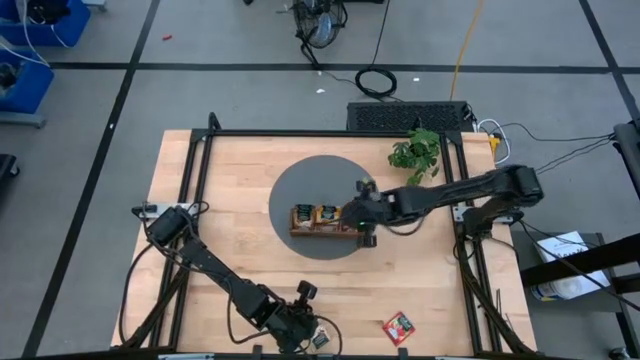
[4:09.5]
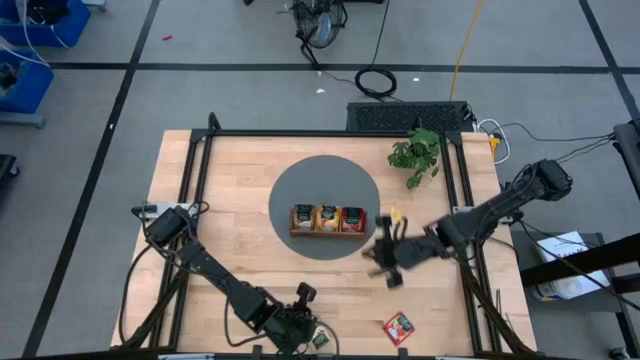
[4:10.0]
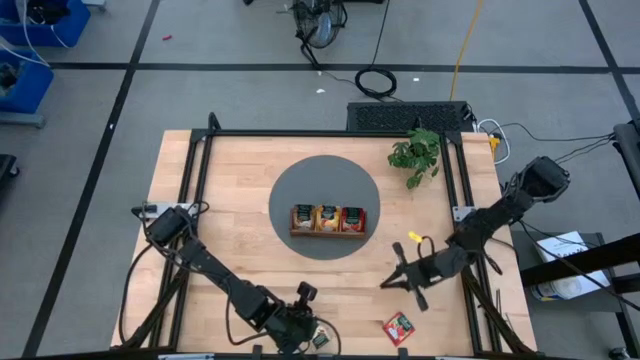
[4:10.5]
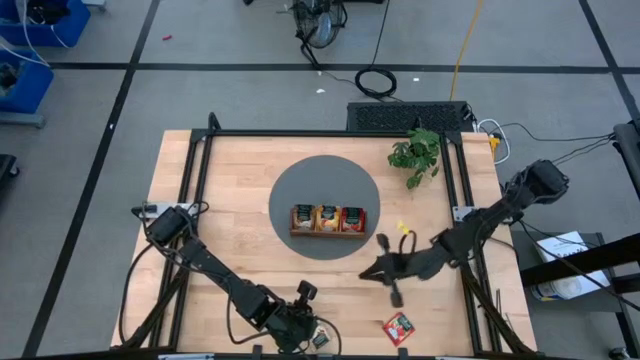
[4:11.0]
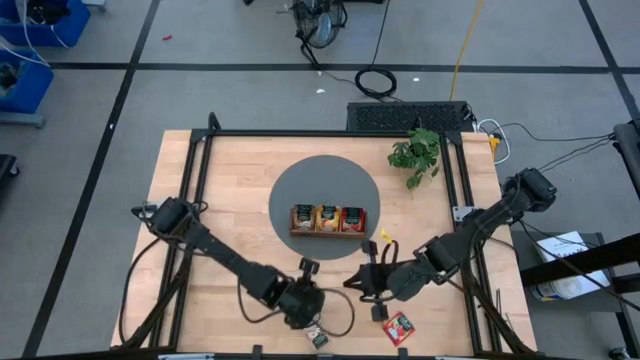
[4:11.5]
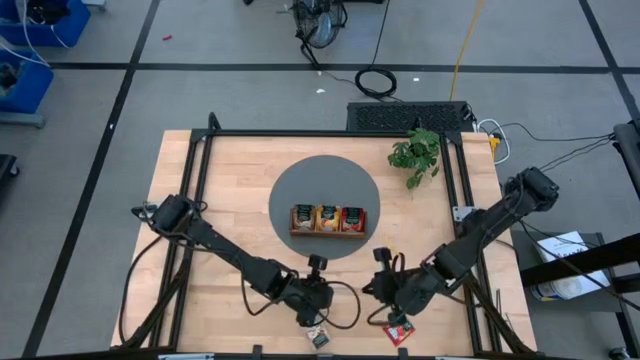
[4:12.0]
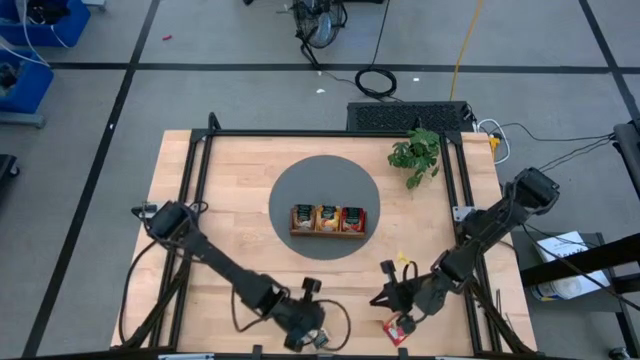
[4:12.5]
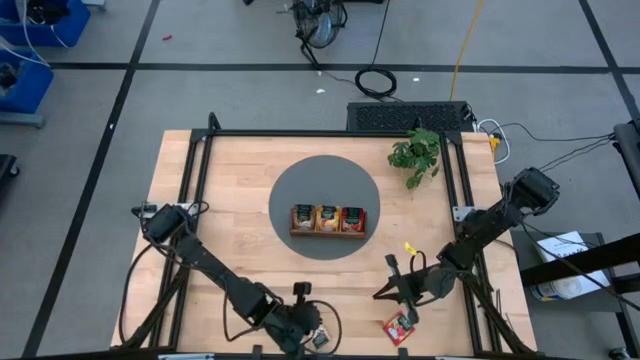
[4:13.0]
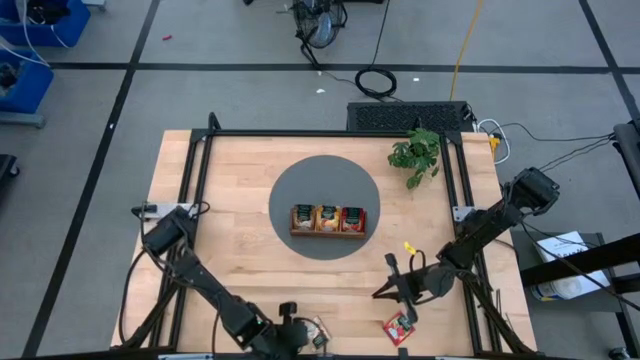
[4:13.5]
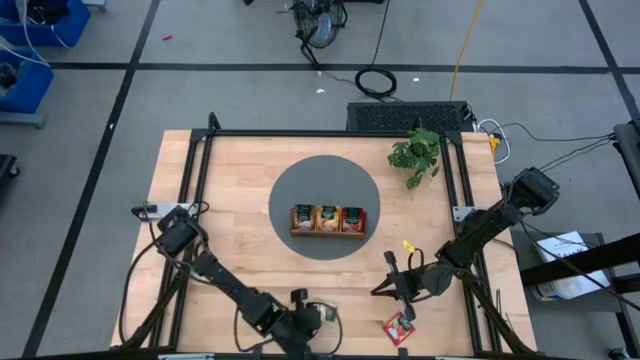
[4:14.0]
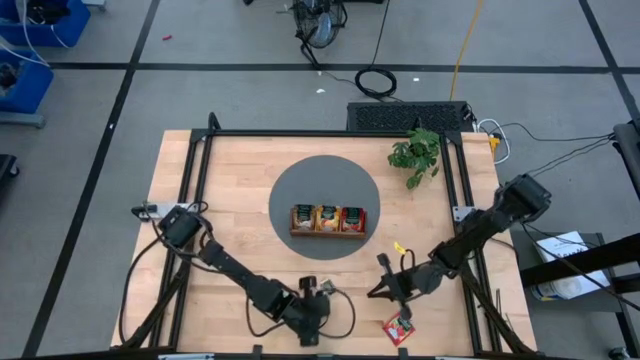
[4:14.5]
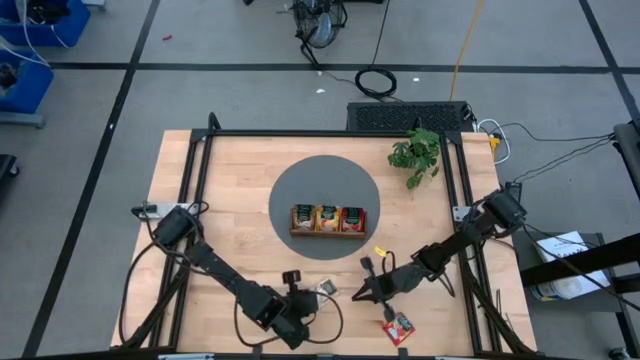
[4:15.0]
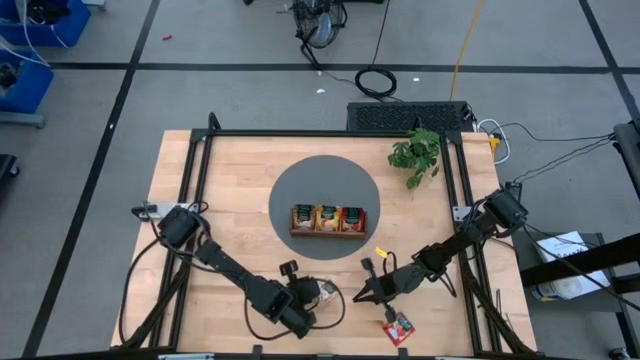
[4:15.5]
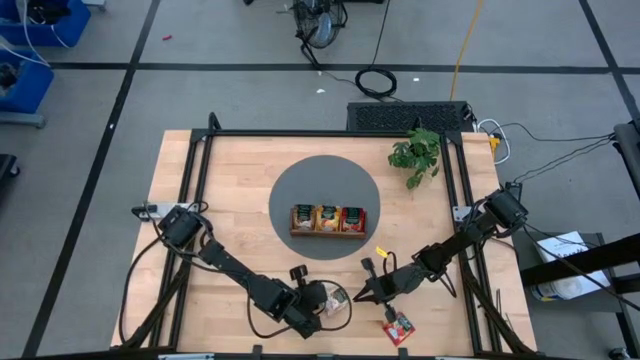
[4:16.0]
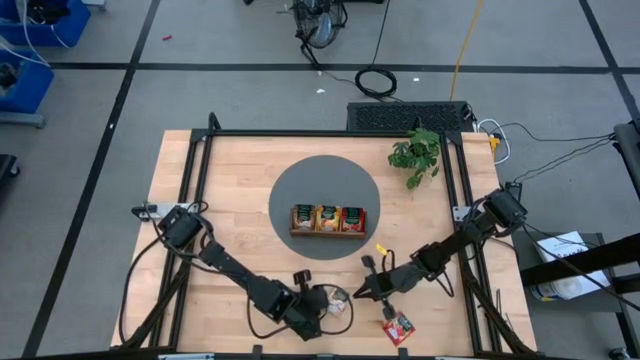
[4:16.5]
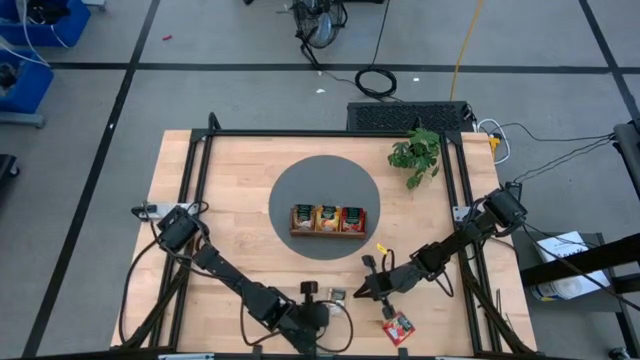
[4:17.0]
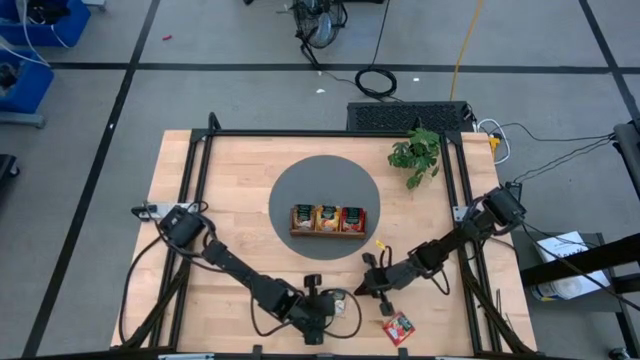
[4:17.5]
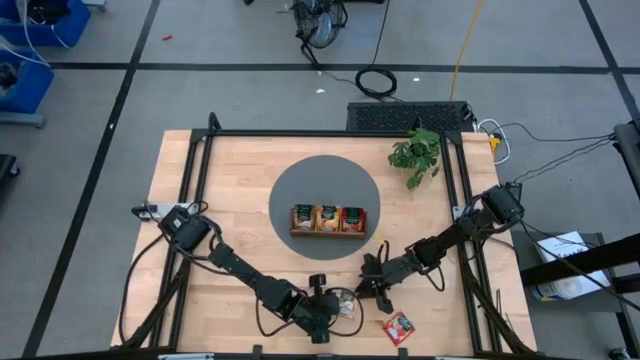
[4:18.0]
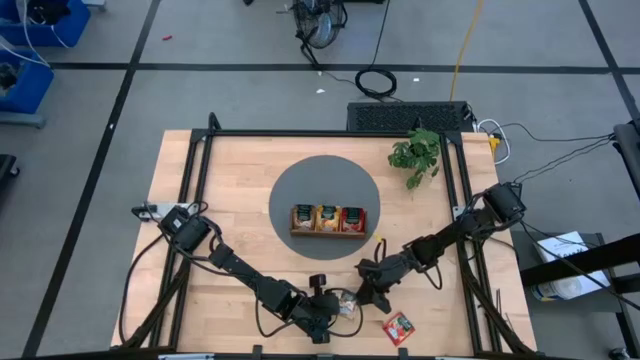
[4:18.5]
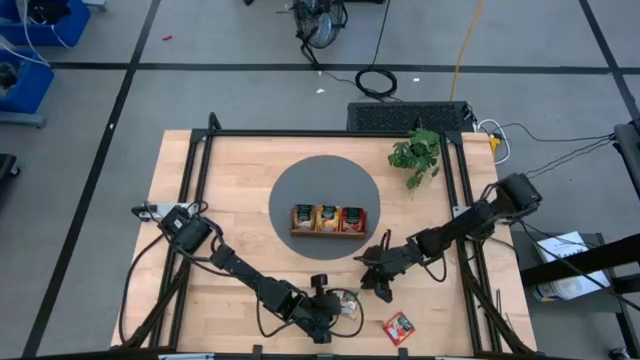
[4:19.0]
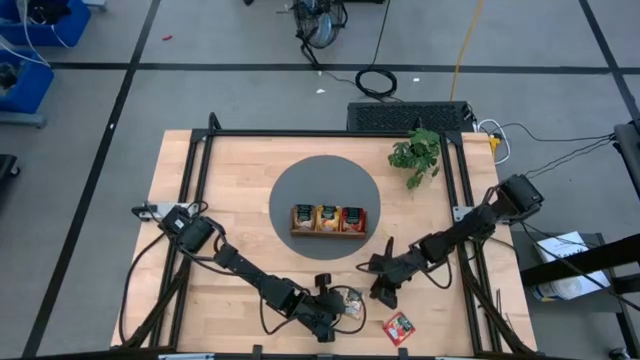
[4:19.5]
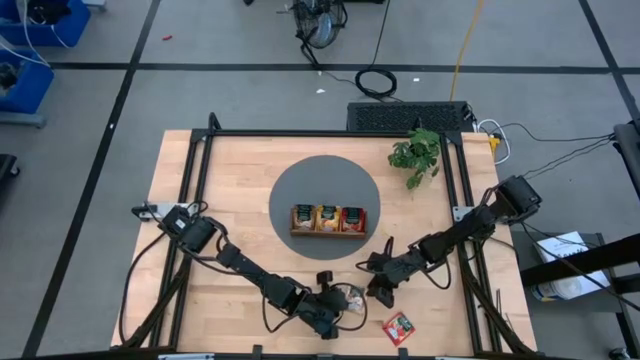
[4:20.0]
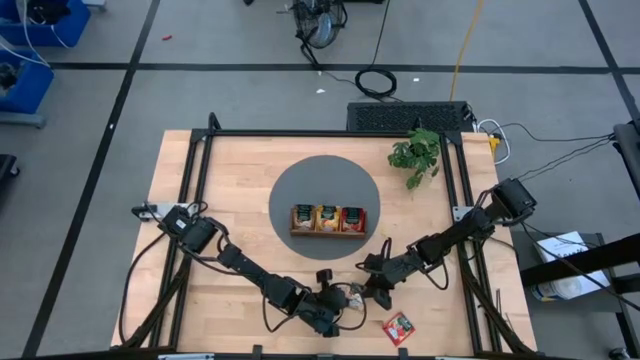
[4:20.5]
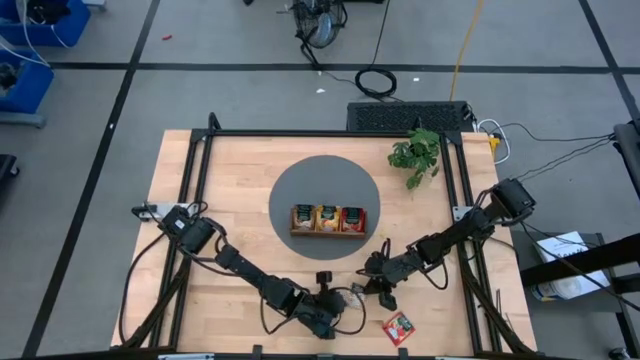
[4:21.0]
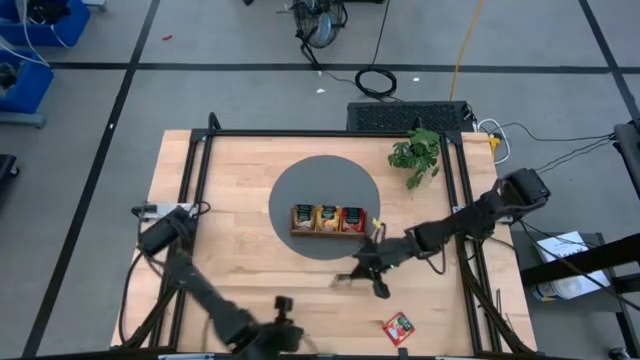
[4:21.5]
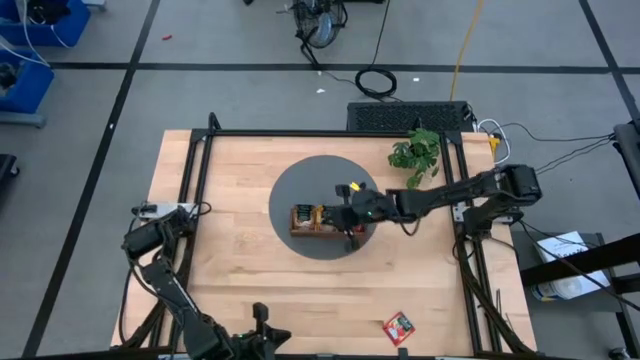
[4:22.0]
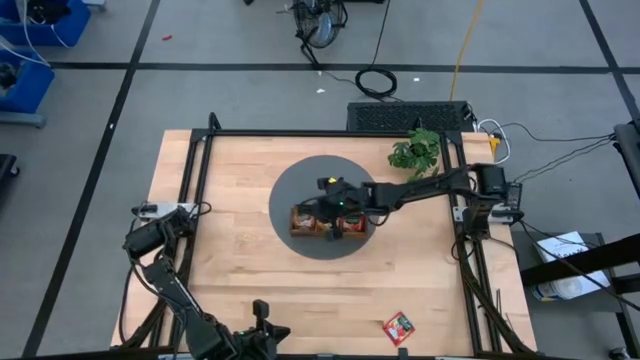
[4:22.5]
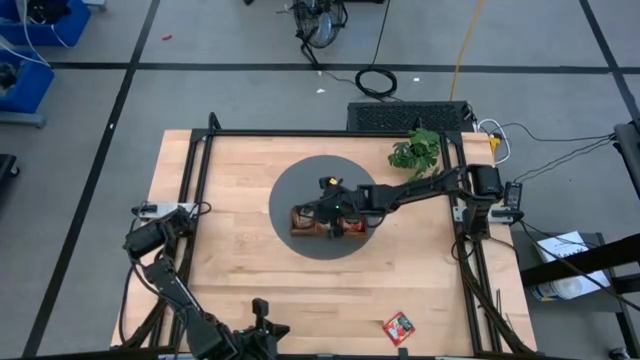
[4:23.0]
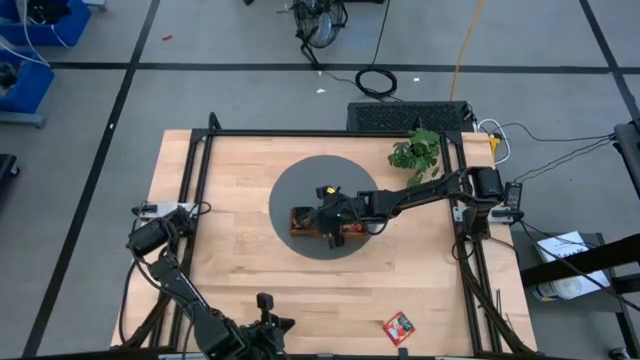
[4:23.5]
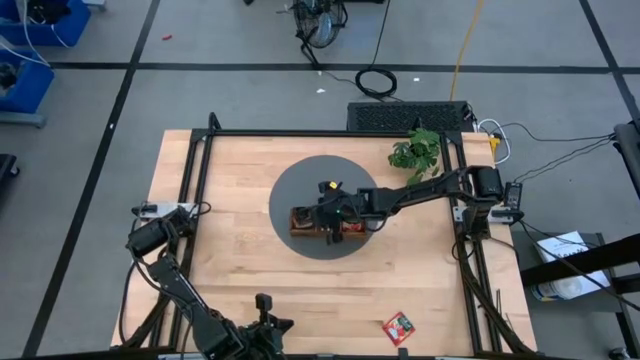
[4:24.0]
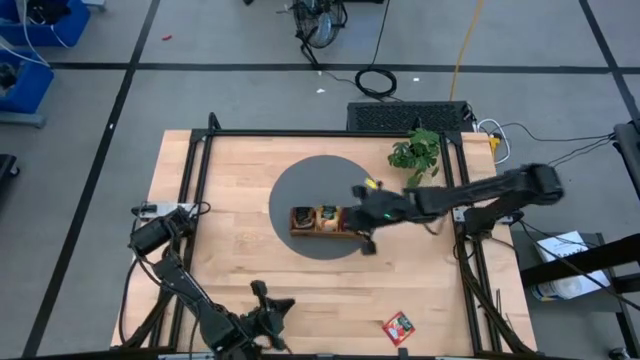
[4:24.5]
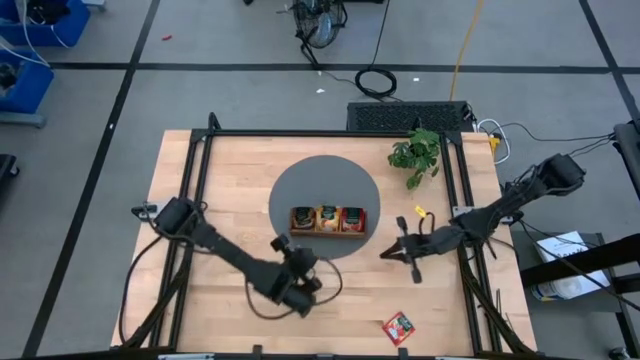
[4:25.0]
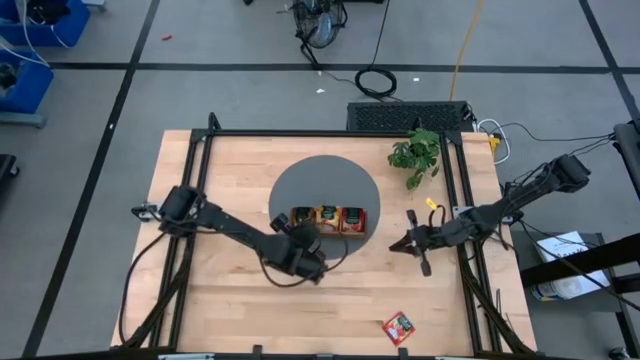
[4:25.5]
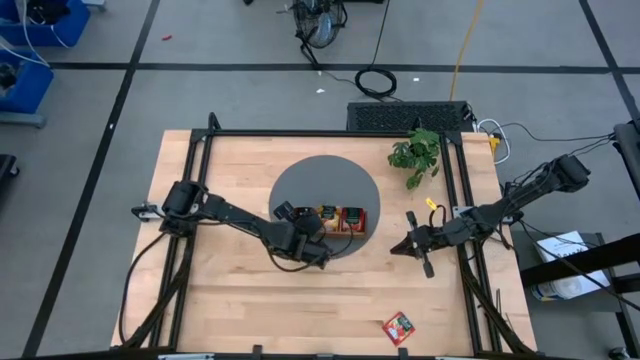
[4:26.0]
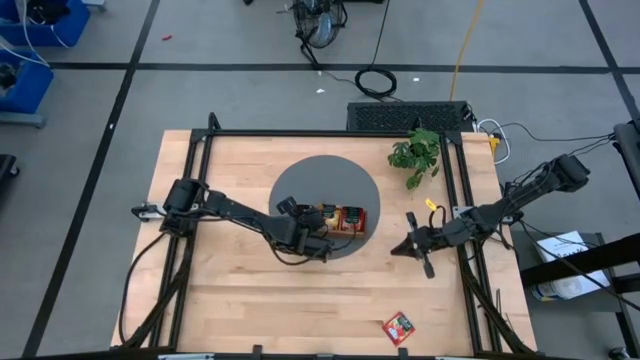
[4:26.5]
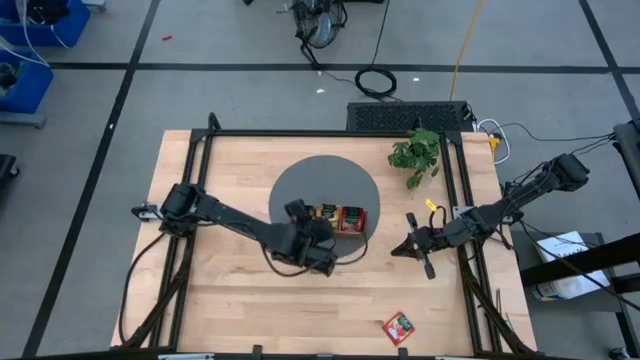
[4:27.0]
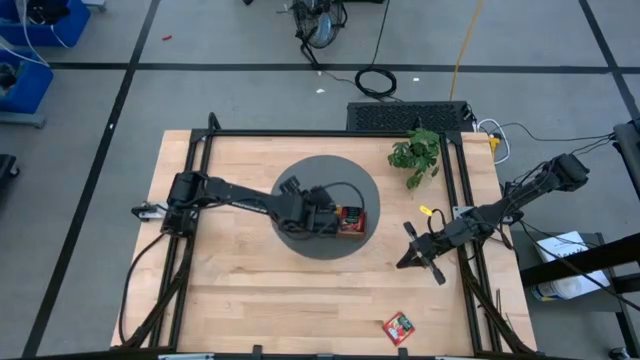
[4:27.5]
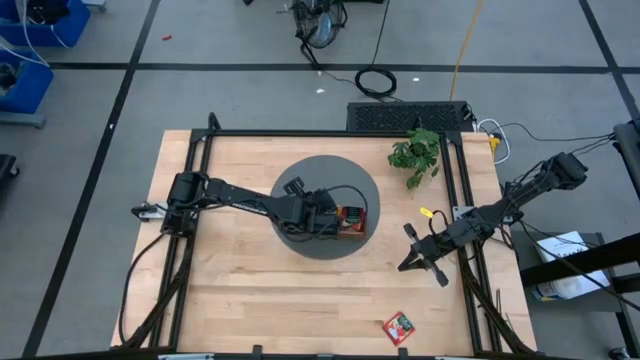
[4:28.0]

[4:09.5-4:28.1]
Task: Pick & Place Tea
Put the brown tea bag into the left section of the wooden organizer

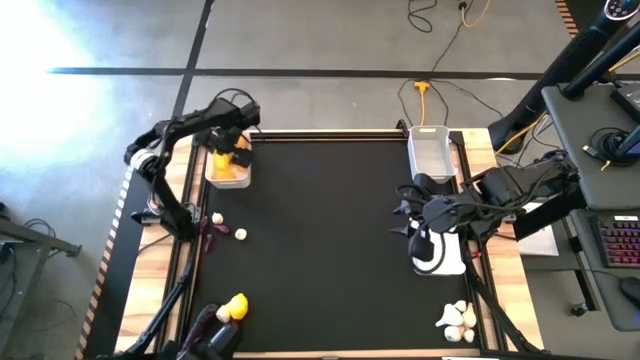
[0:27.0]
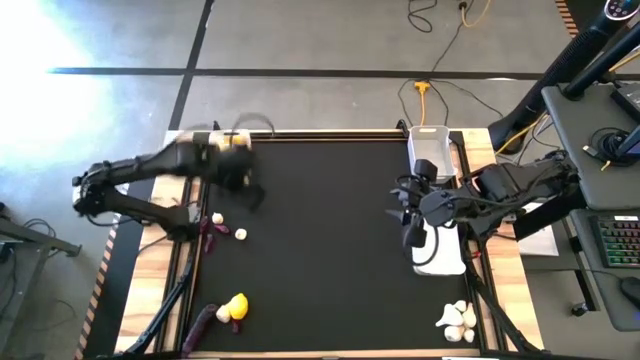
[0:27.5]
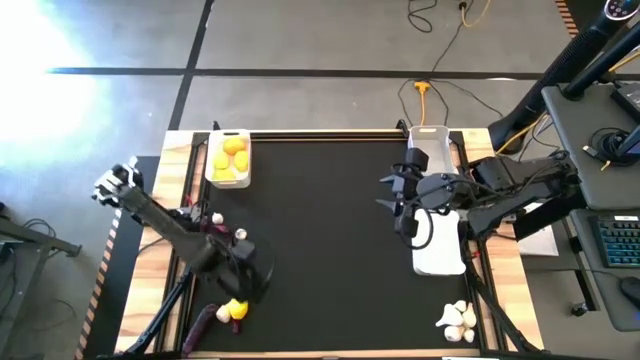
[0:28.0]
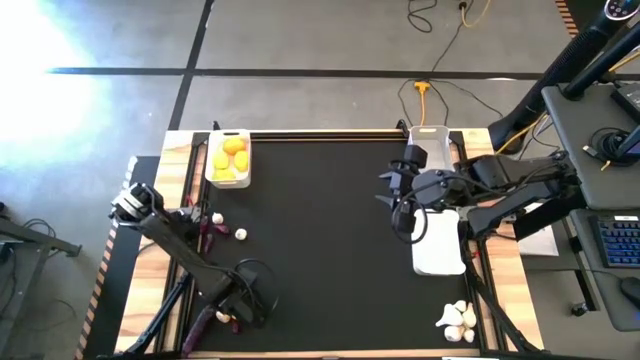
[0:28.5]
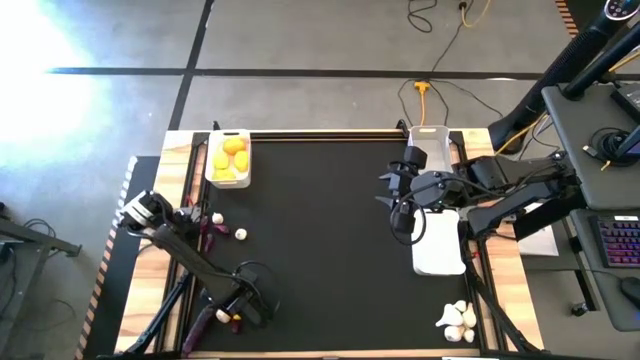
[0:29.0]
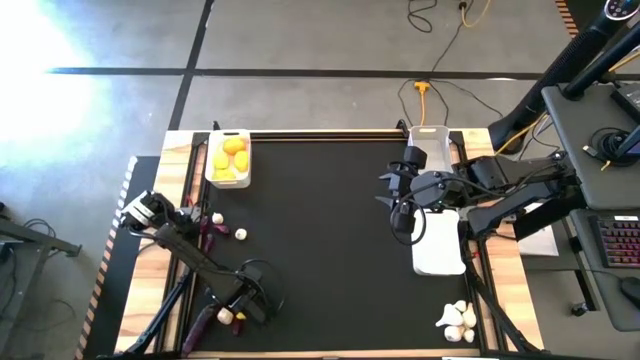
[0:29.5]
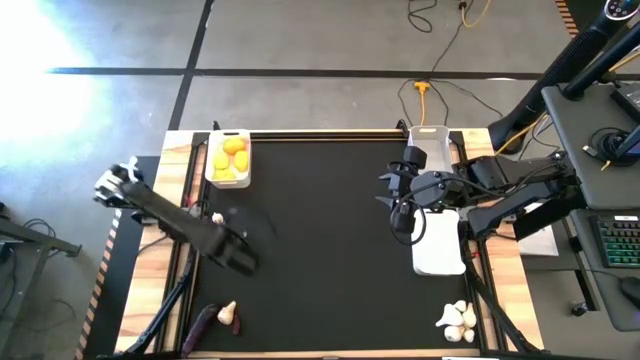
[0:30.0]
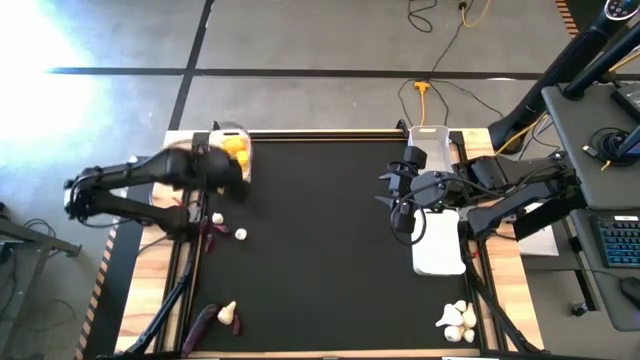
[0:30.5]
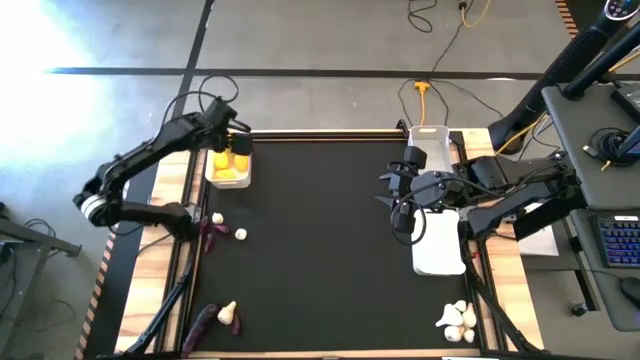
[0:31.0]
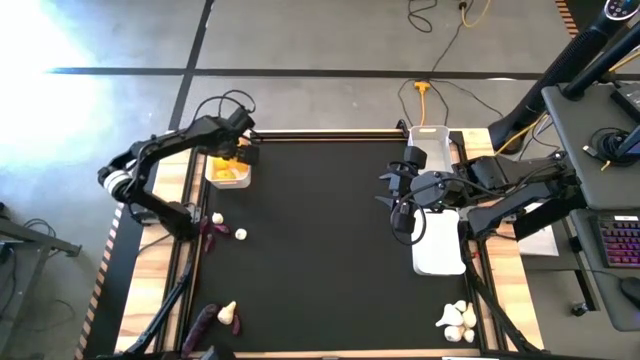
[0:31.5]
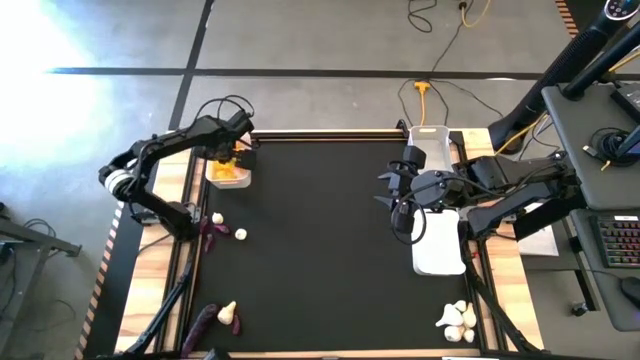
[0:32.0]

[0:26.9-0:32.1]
Task: Sort produce into baskets
Put the yellow lemon into the left white bin
